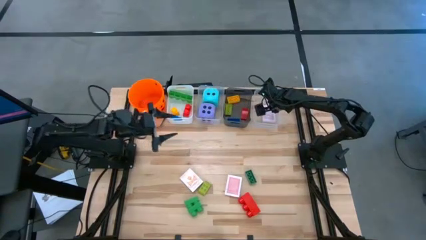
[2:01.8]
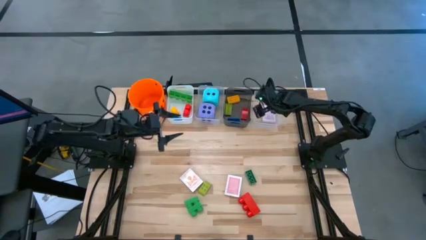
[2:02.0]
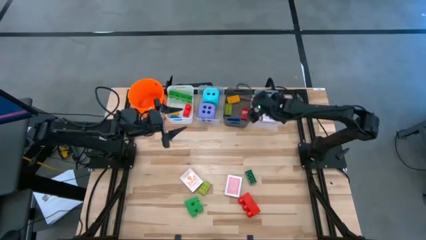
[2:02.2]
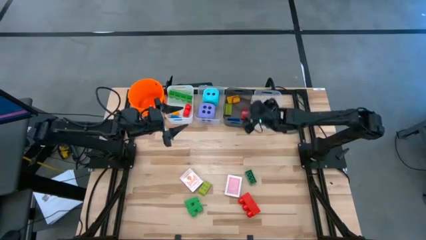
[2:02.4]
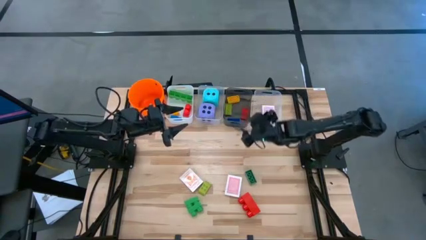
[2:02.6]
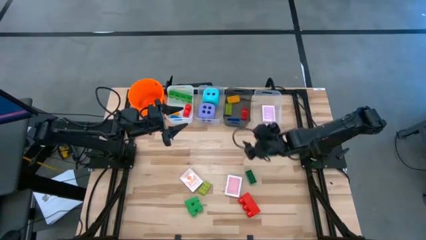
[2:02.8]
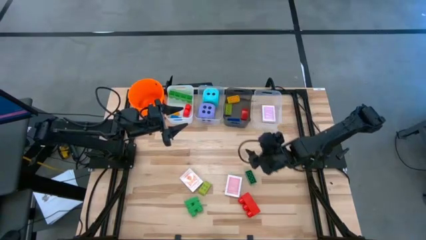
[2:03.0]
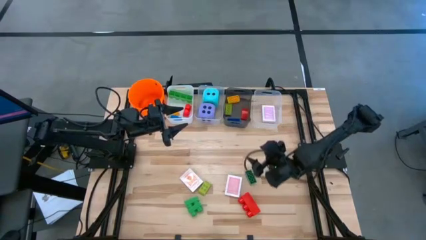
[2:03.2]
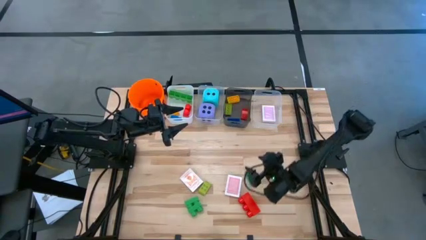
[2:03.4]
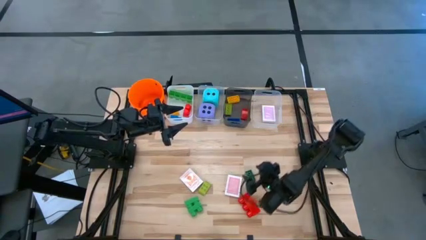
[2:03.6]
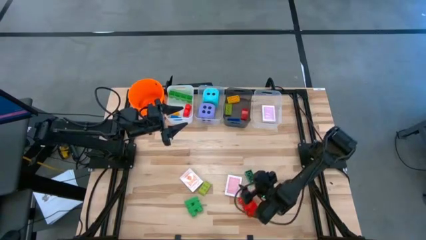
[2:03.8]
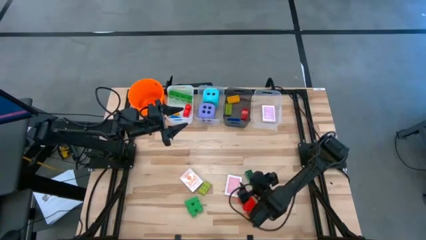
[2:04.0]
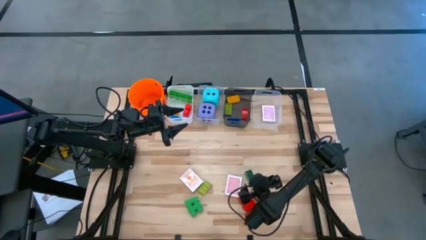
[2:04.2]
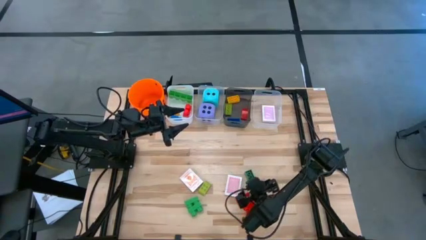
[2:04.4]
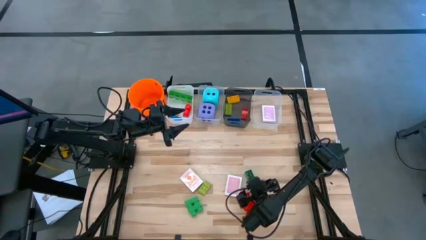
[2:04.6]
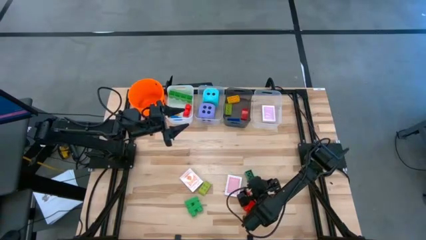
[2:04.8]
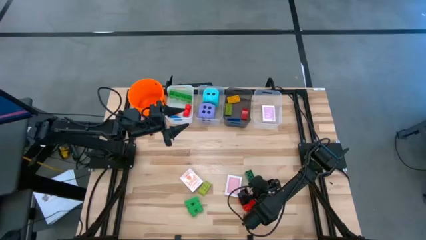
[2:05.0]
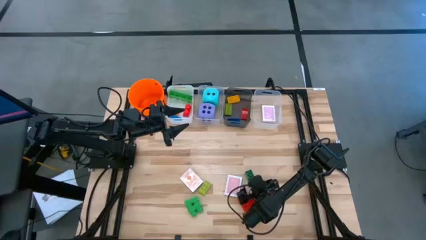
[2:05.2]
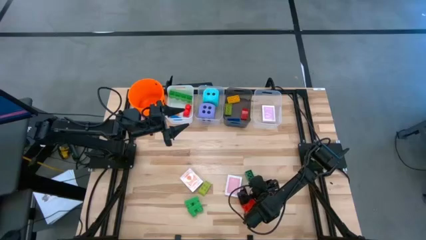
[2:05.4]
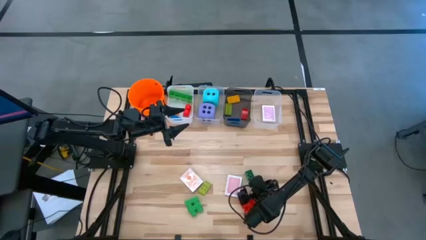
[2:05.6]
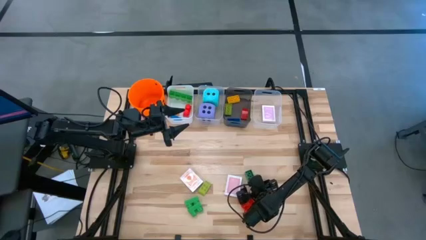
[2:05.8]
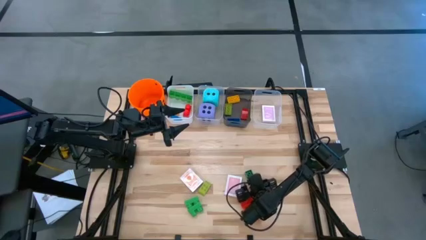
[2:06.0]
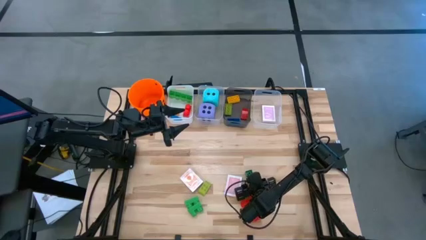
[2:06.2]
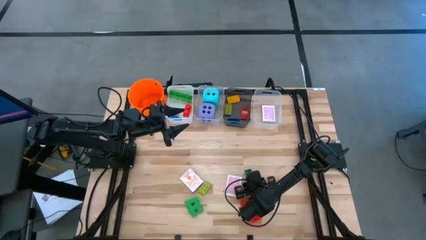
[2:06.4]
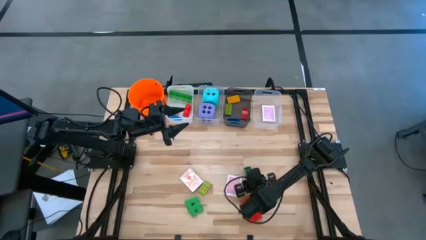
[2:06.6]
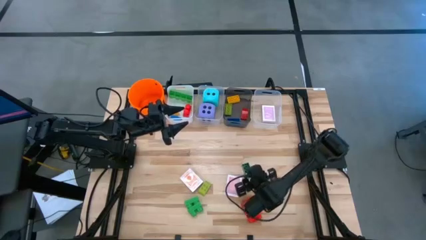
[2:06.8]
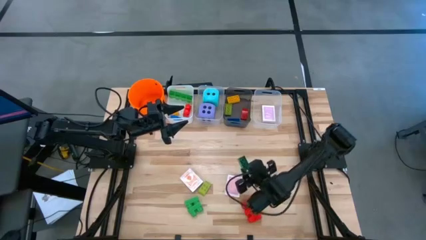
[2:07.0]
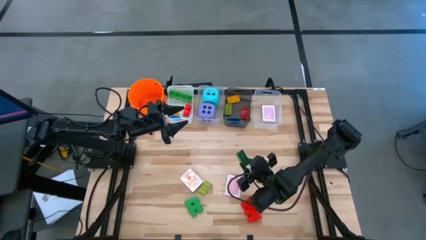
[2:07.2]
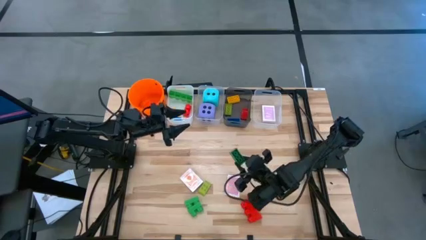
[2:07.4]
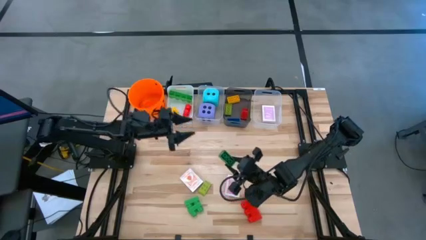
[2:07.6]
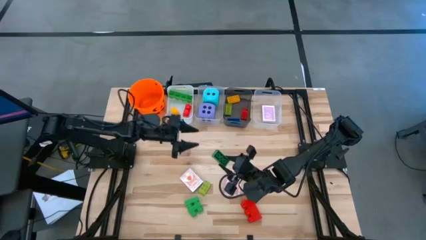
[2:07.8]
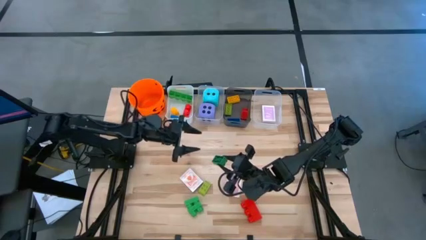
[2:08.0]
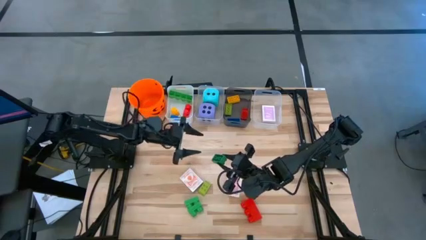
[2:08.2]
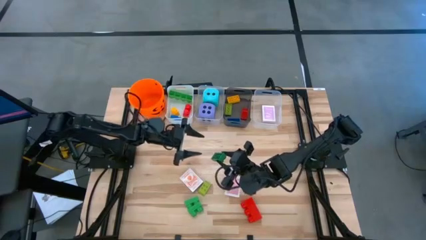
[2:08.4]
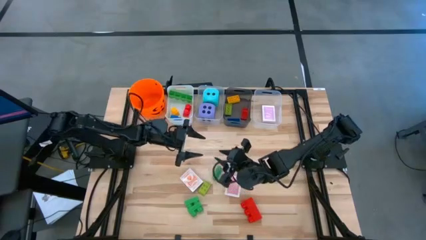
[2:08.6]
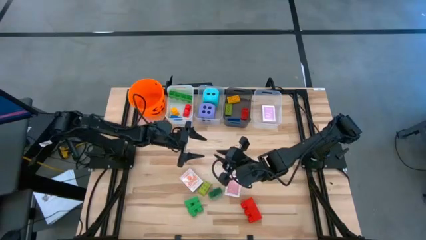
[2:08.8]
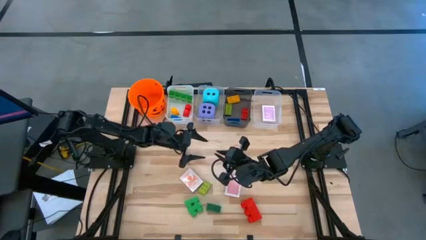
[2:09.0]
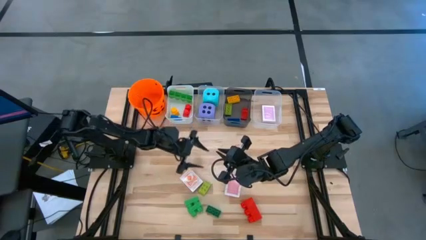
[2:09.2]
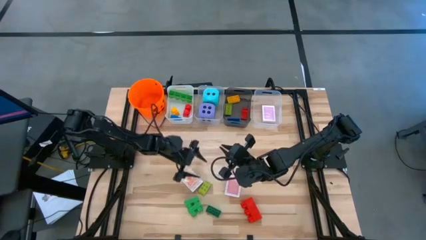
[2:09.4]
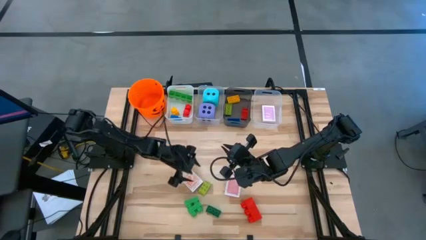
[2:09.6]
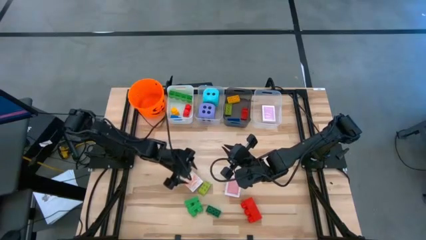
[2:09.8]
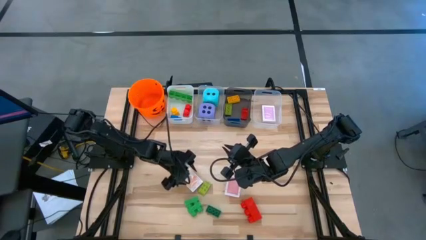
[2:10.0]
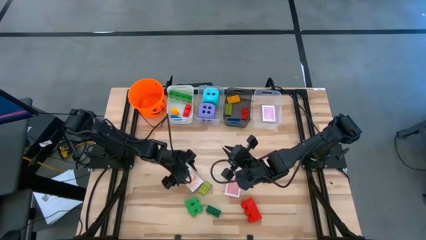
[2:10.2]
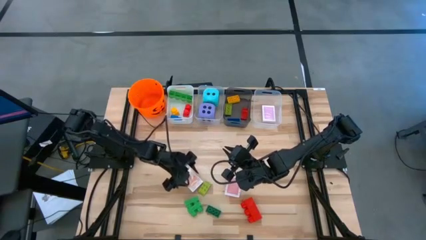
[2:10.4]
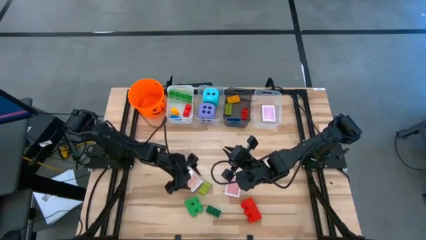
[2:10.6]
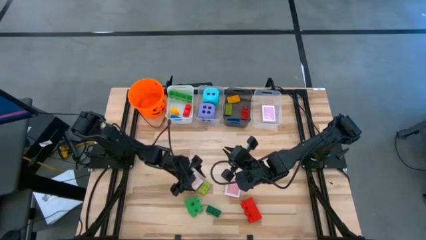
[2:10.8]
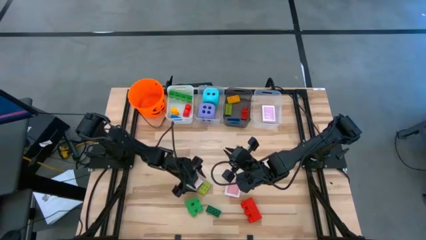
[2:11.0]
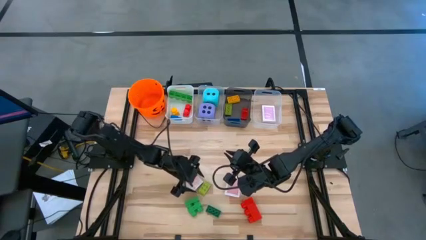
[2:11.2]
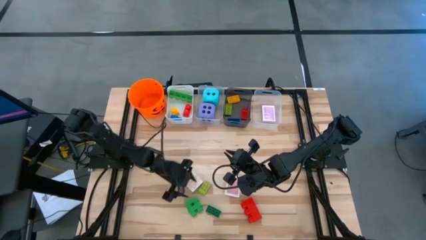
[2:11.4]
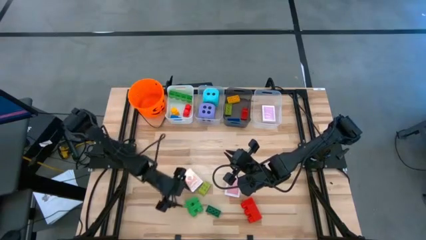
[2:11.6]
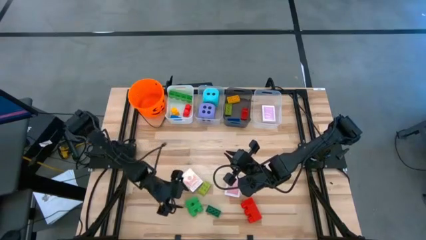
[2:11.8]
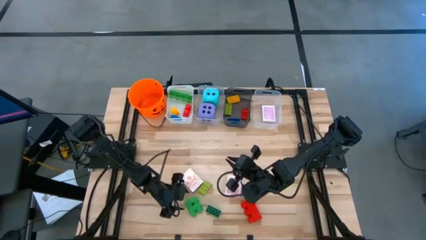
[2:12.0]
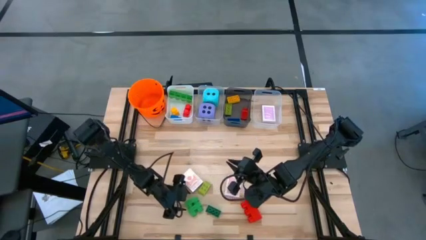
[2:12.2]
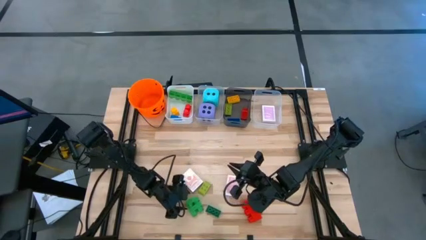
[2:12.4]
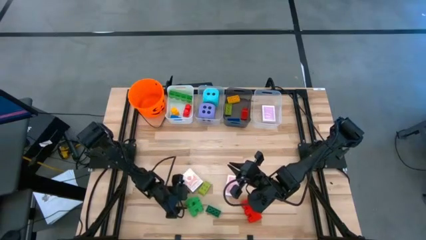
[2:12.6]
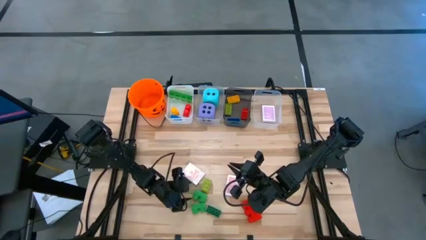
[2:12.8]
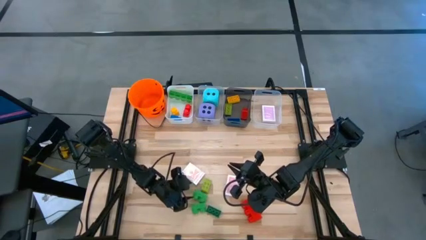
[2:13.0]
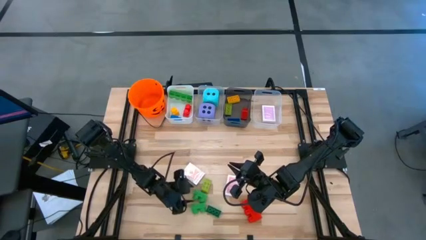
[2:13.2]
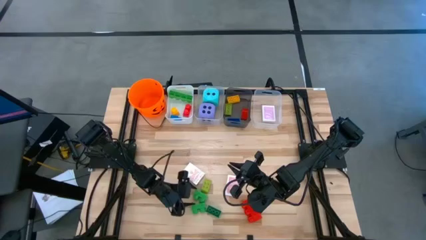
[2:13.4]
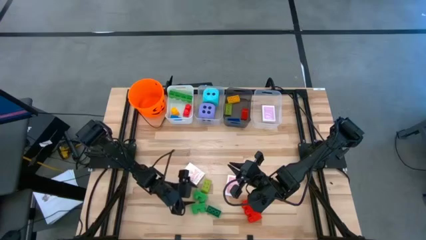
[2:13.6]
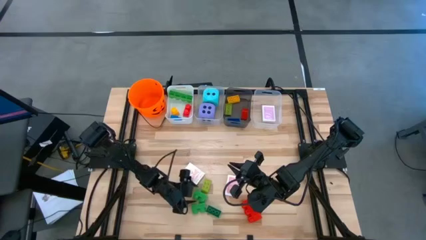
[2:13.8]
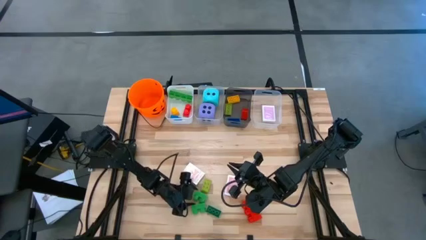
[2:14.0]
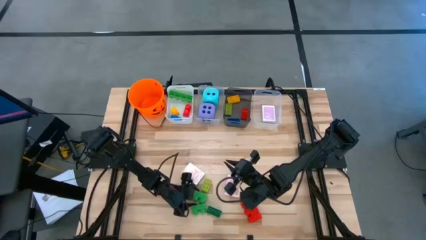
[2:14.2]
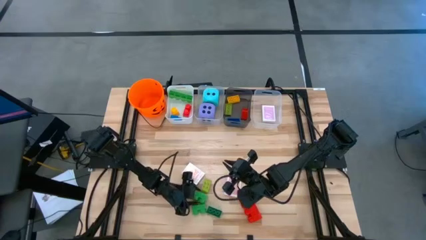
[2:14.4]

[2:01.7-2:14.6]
Task: Pick & Place Toys
Put the right green game piece into the black bin

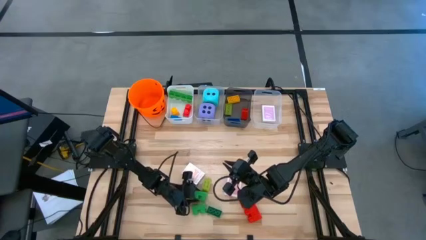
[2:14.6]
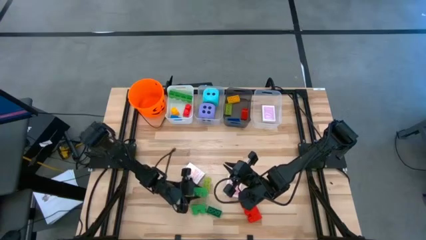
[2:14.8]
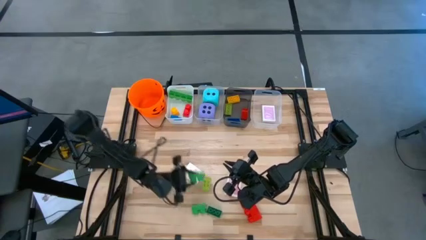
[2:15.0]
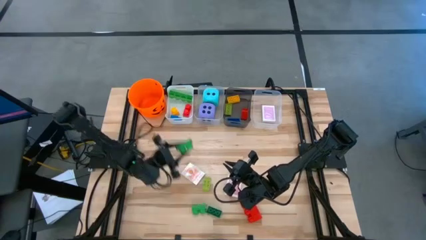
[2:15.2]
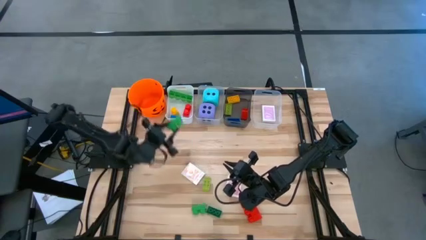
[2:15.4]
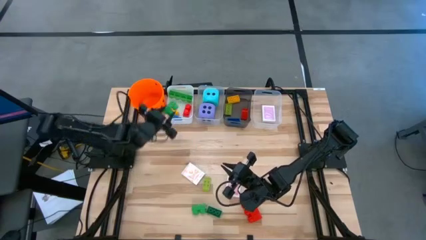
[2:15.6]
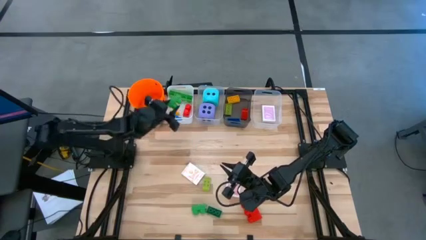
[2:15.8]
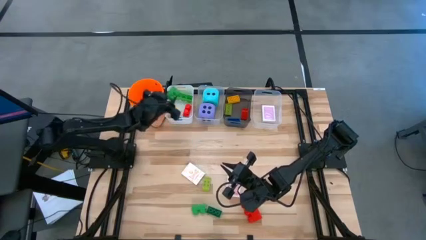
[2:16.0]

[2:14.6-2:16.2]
Put the top green game piece into the white bin

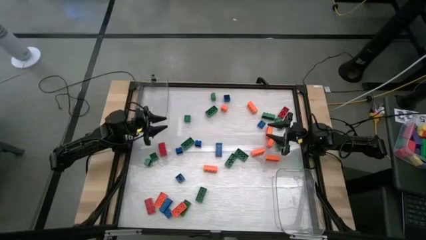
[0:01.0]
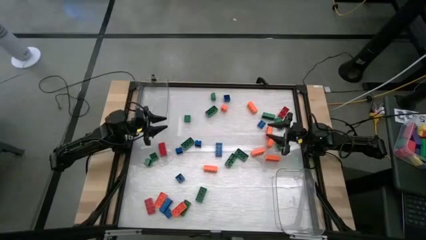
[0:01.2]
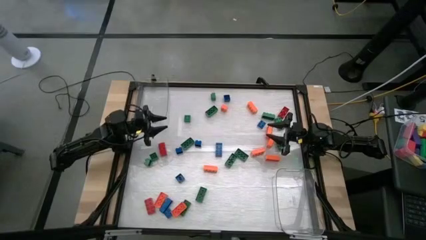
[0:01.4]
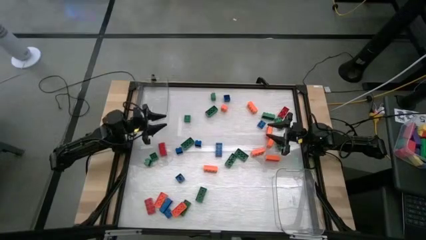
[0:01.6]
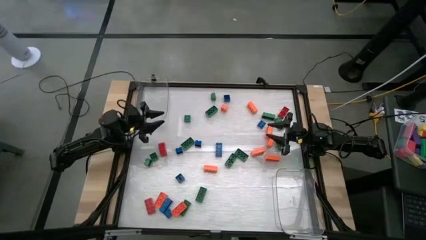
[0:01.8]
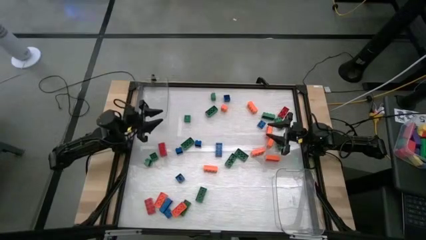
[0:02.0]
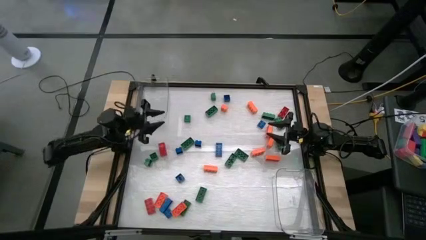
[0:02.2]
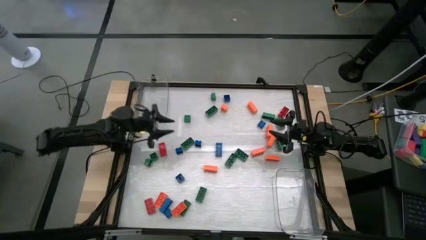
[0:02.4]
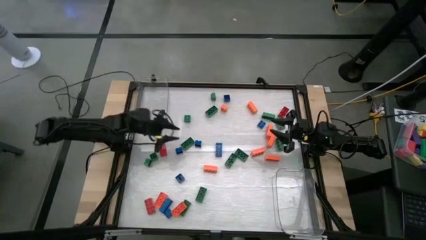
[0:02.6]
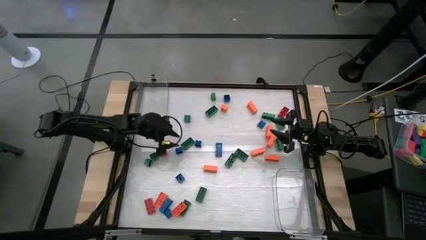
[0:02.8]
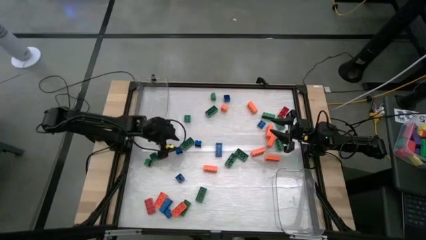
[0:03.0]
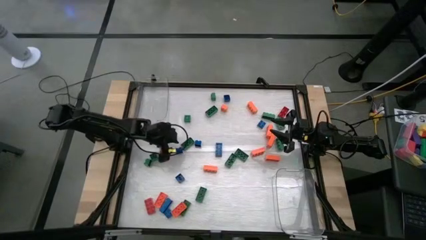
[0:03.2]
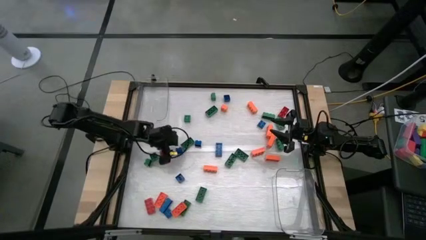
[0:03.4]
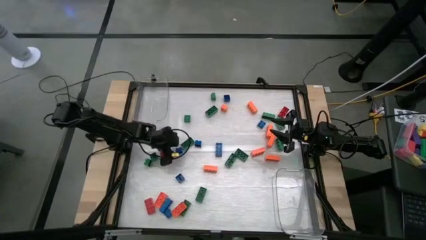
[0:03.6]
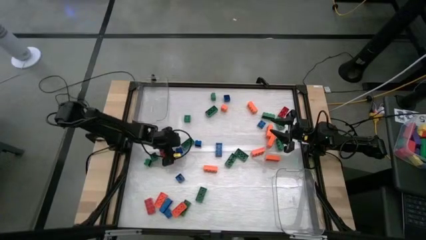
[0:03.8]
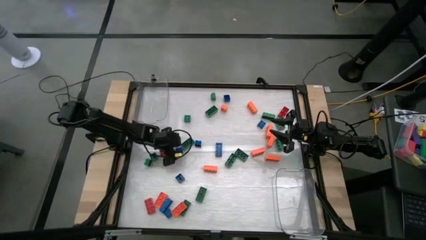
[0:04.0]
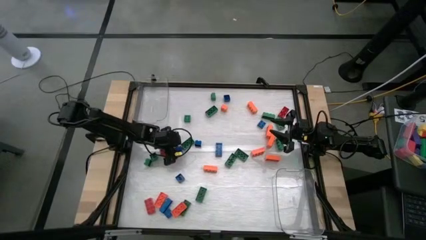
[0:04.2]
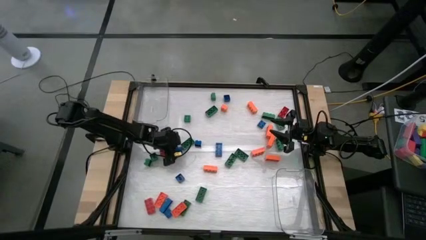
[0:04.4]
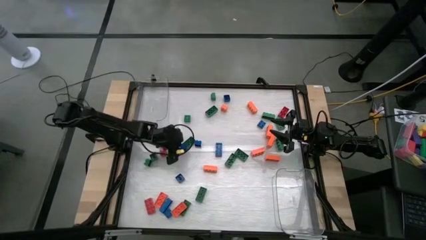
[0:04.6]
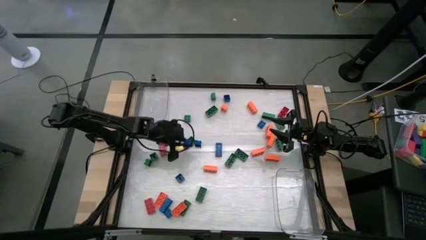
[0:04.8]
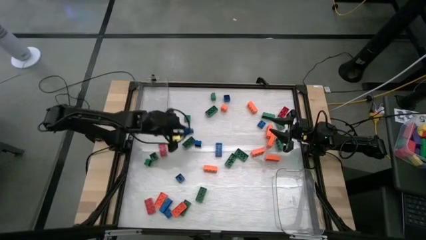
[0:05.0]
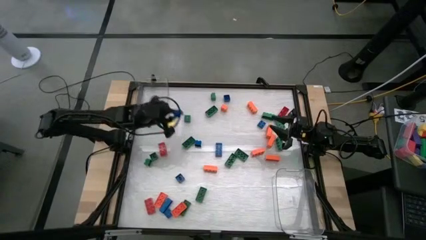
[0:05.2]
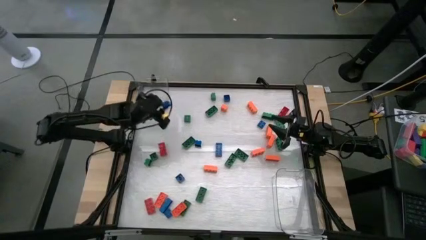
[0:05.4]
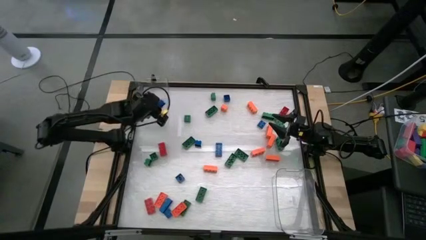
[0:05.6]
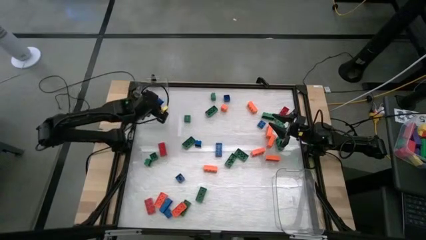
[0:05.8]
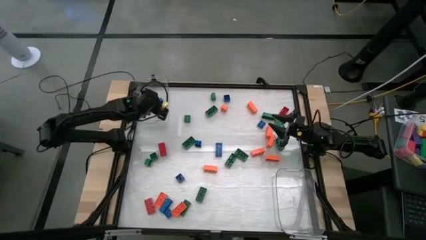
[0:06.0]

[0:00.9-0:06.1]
Task: Sort blocks by size
Put the 4 stud blue game piece into the top transparent bin
